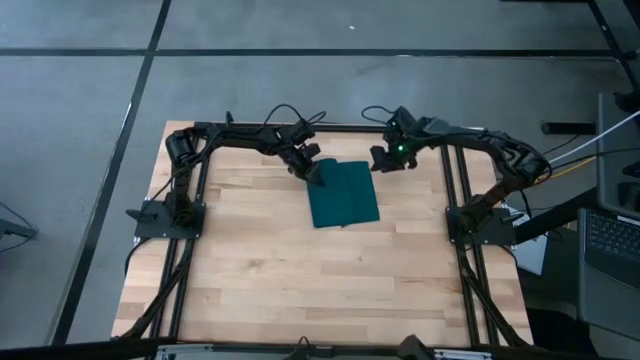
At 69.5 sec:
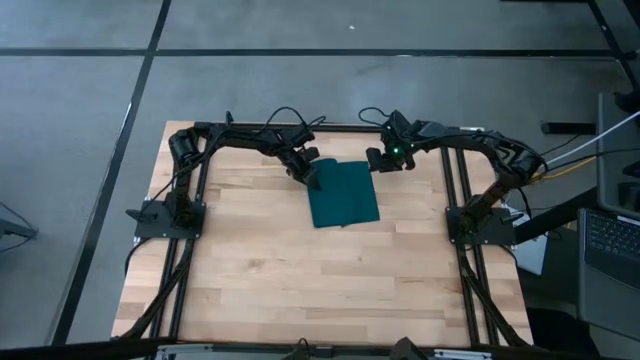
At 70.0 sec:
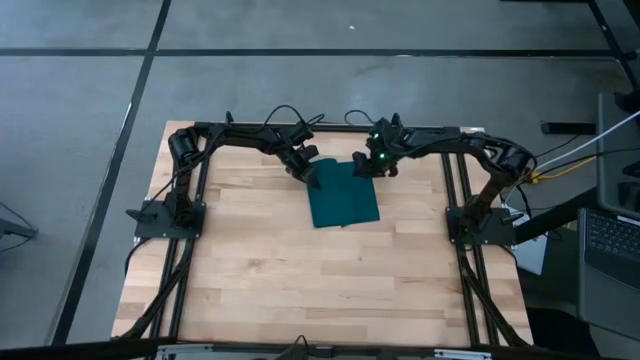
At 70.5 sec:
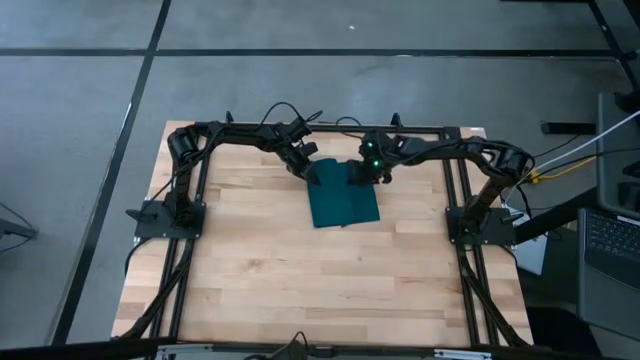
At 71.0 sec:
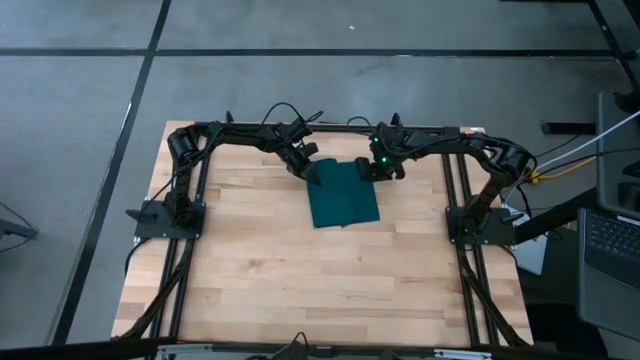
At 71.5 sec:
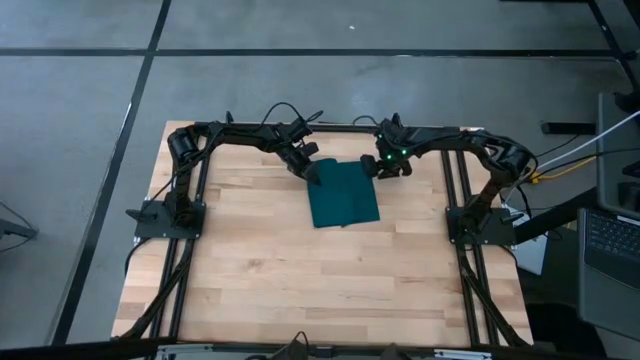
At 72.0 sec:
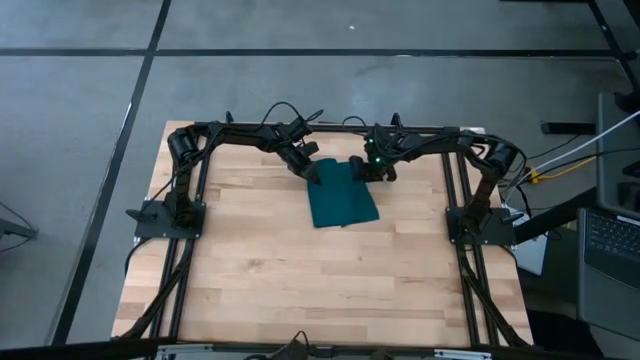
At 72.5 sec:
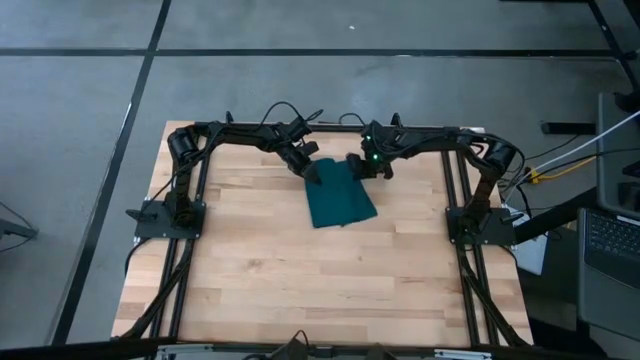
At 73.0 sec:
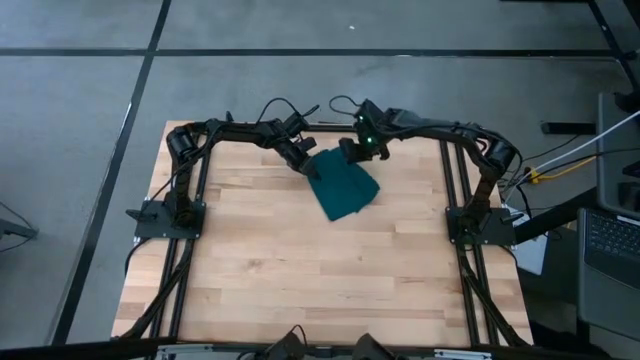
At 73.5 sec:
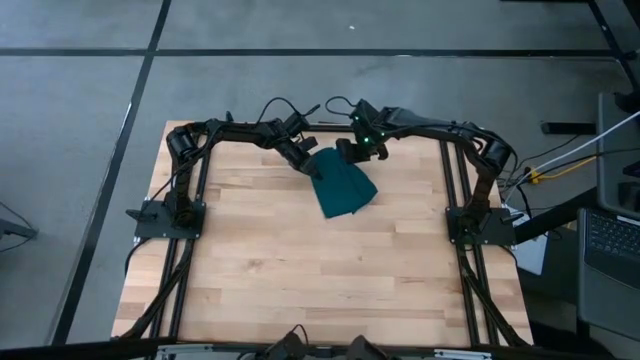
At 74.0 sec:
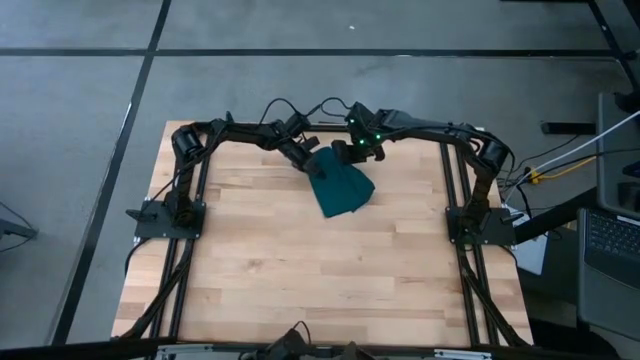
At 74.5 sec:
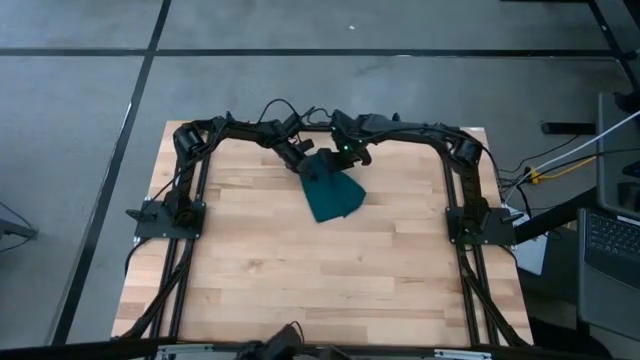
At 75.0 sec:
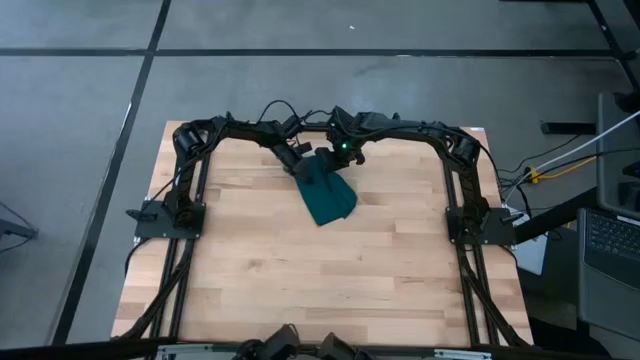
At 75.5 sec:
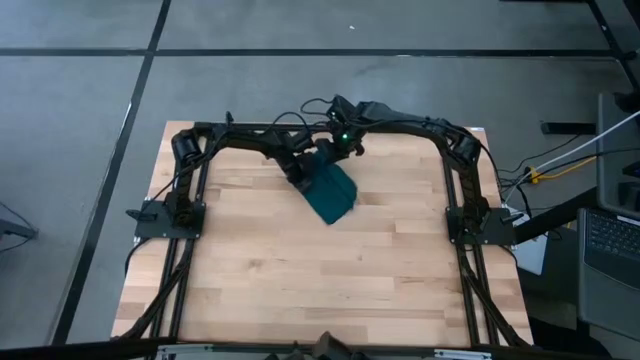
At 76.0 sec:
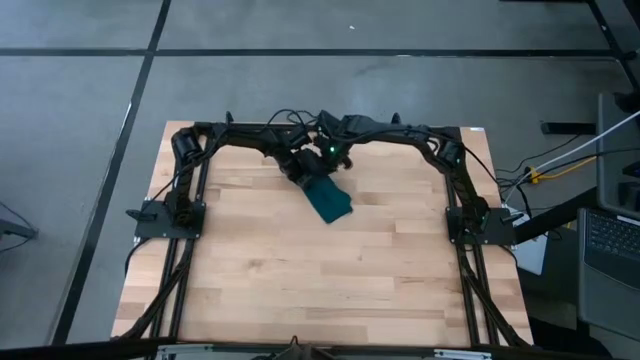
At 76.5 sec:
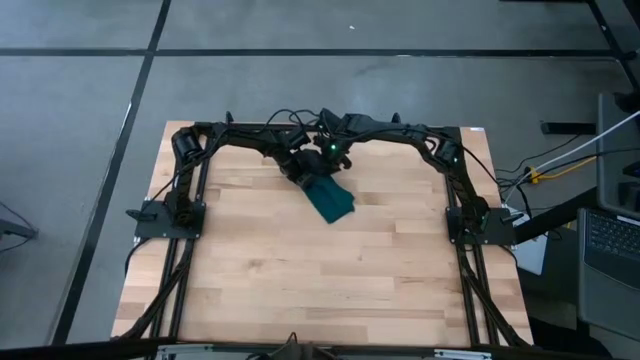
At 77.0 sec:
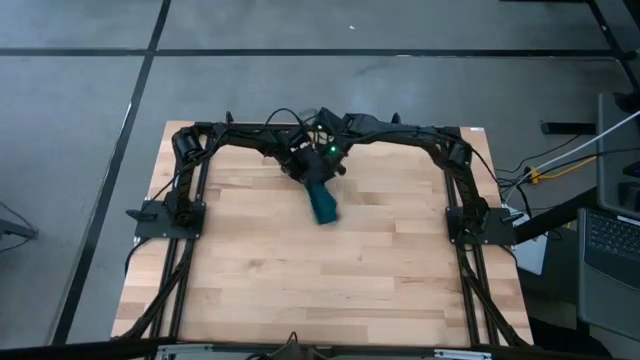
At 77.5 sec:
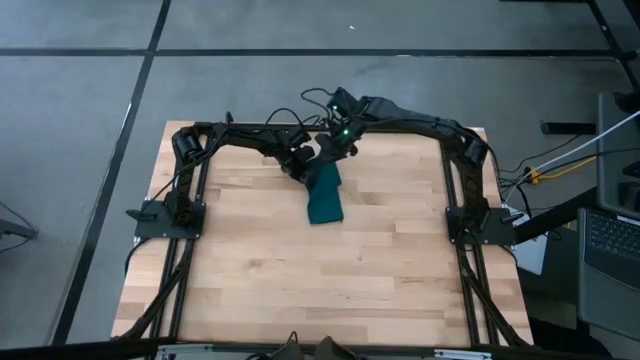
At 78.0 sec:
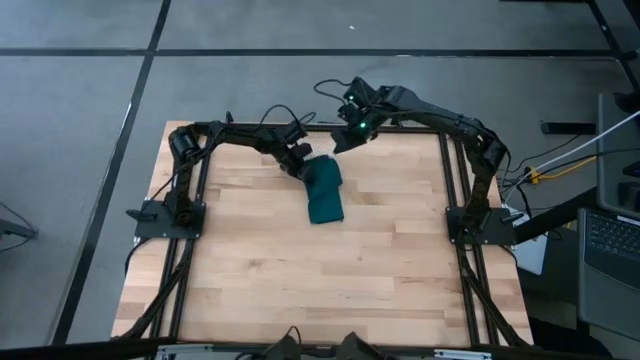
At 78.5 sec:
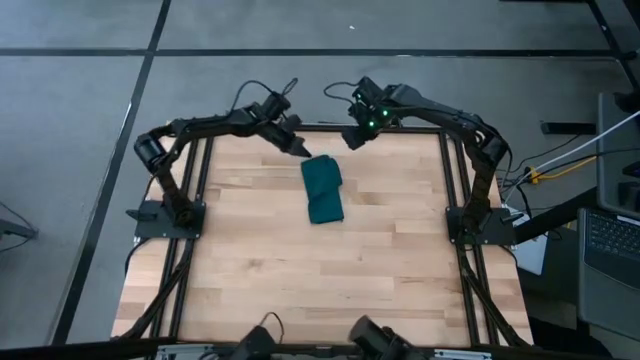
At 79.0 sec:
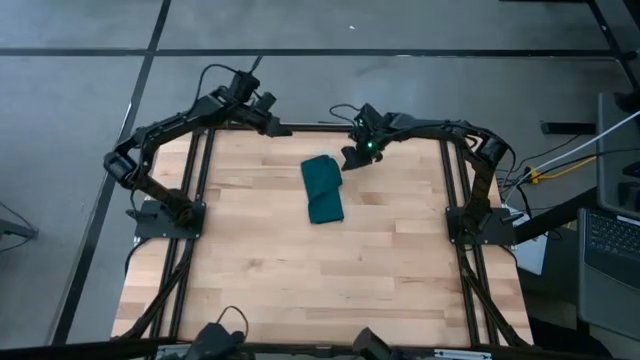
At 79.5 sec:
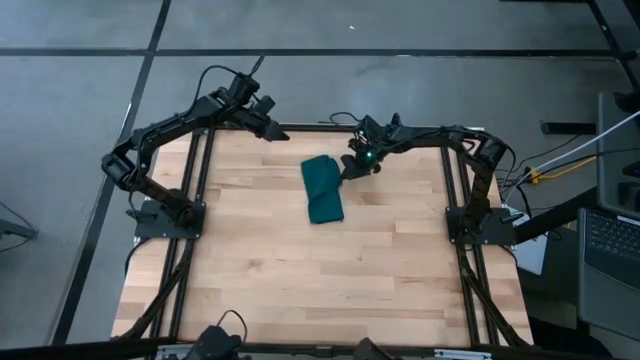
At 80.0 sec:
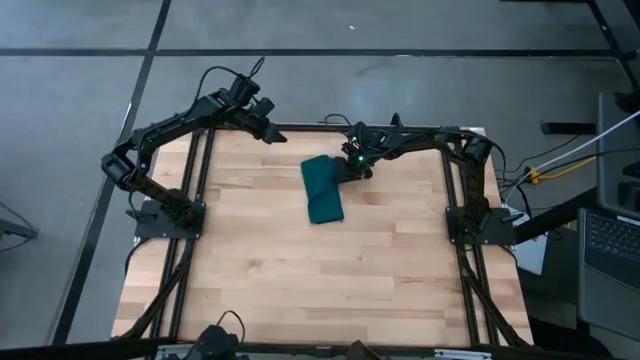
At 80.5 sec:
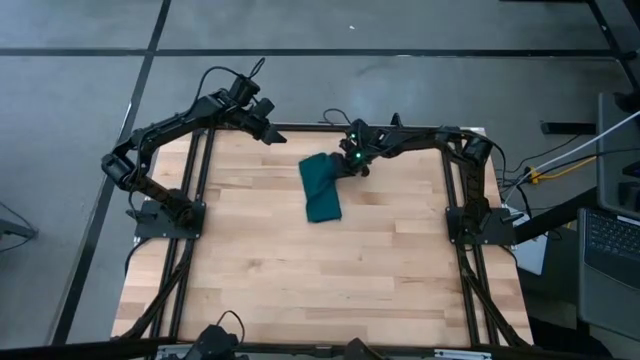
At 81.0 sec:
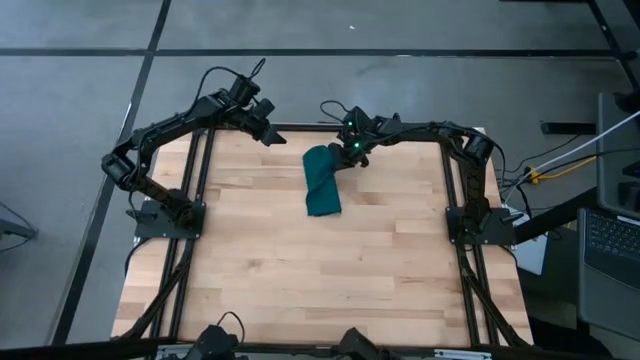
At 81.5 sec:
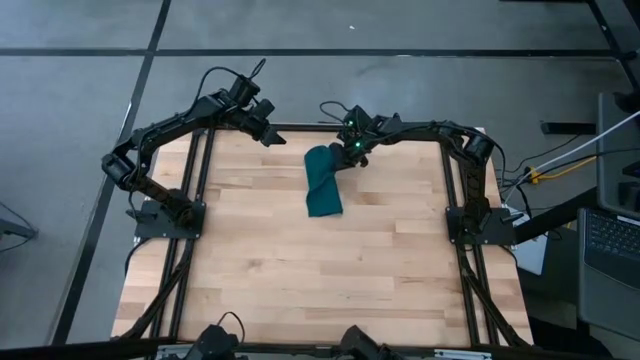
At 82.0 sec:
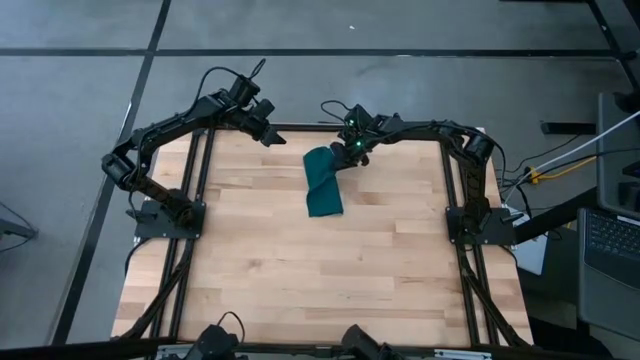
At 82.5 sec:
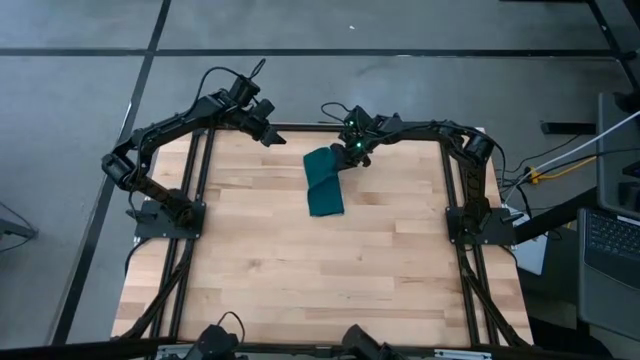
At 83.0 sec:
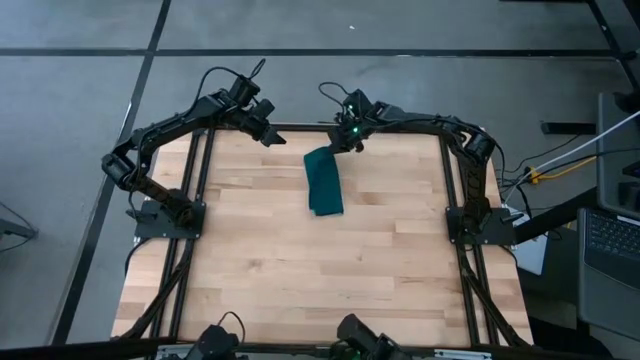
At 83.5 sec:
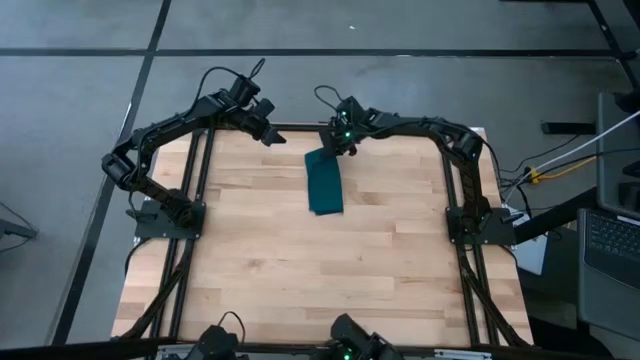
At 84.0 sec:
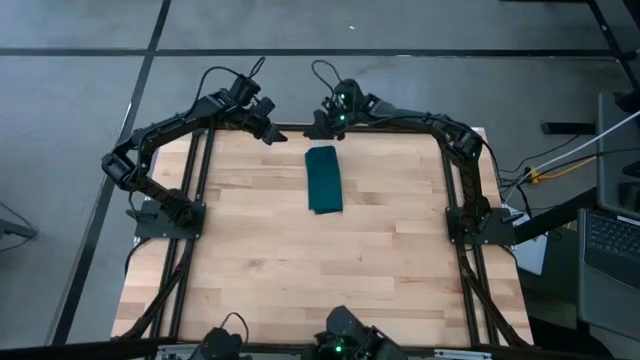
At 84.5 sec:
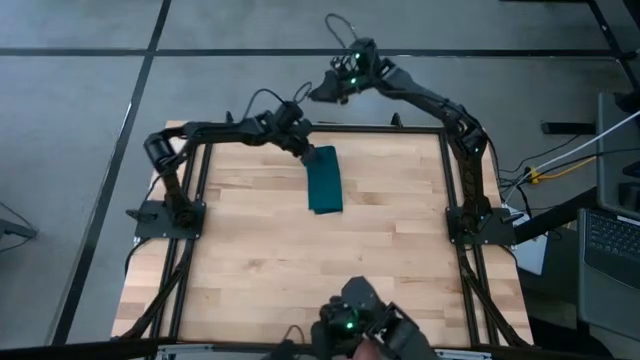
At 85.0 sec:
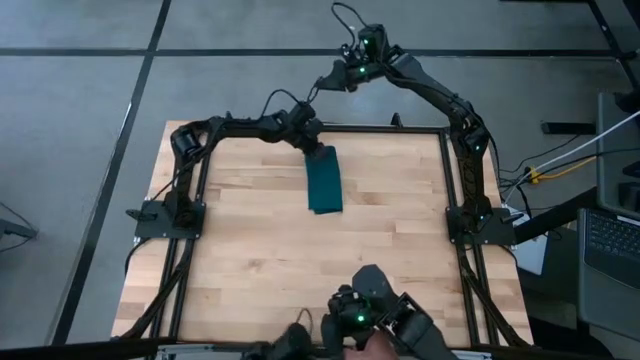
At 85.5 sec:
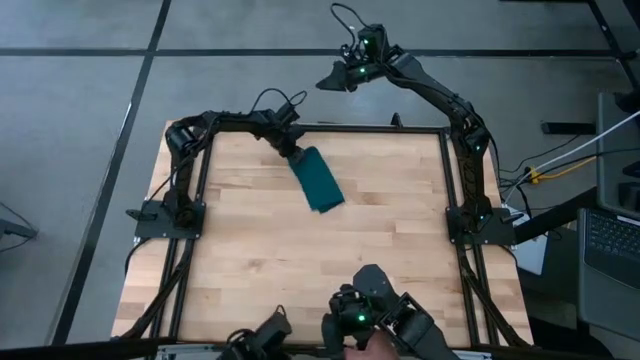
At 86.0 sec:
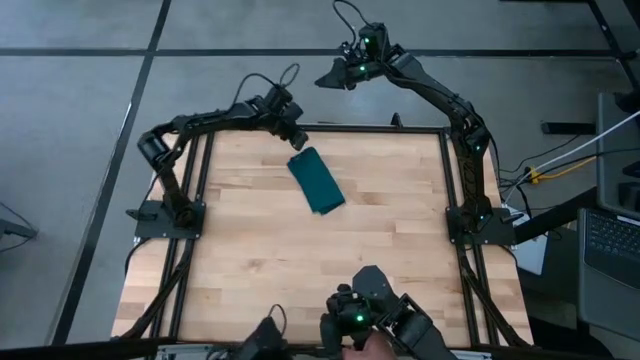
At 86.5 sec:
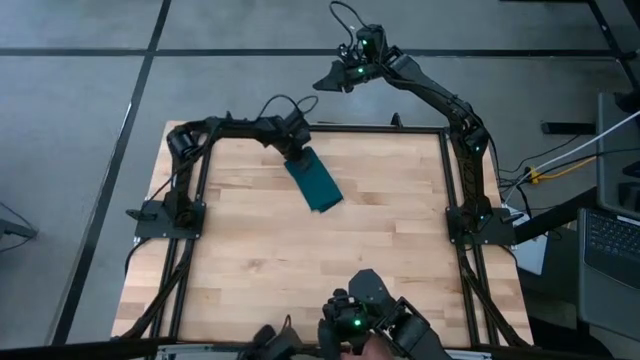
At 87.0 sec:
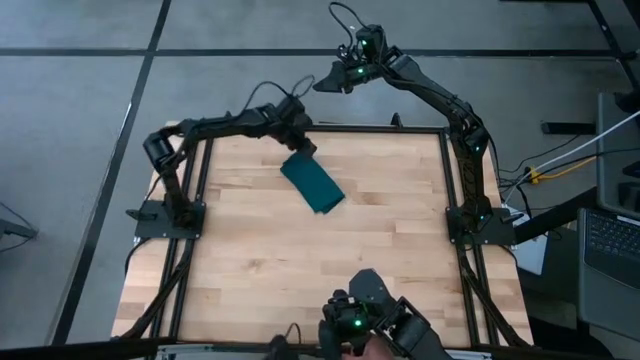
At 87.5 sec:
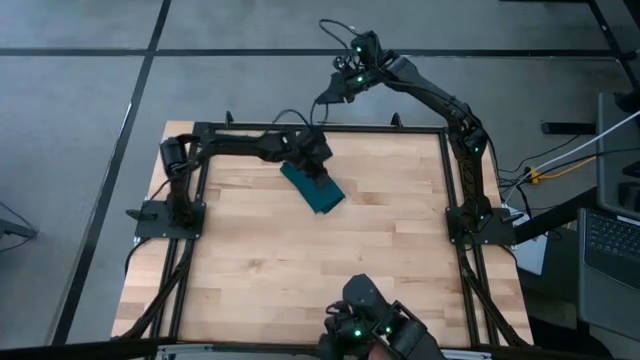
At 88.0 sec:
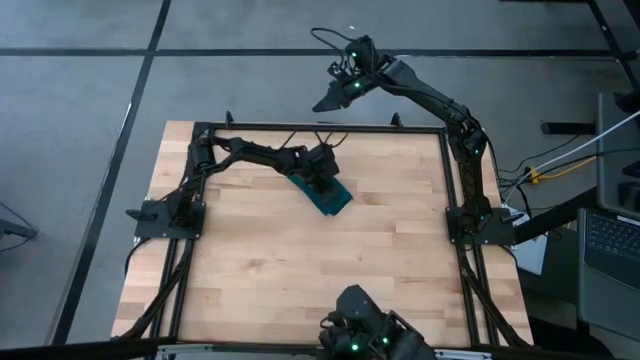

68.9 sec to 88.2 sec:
Task: Fold microfiber towels
Fold the dark green napkin

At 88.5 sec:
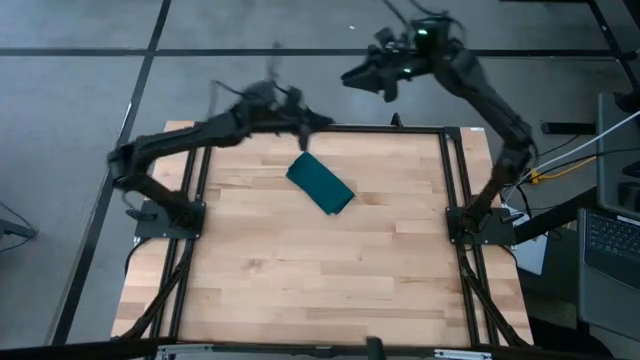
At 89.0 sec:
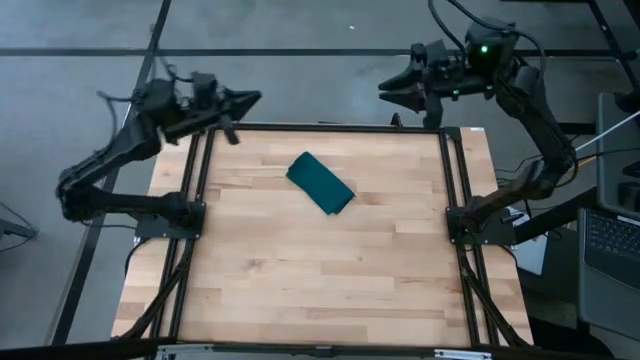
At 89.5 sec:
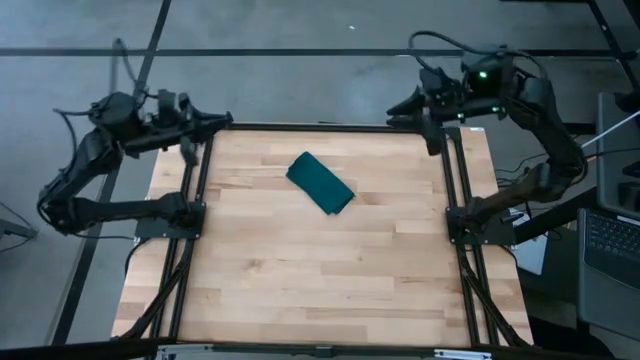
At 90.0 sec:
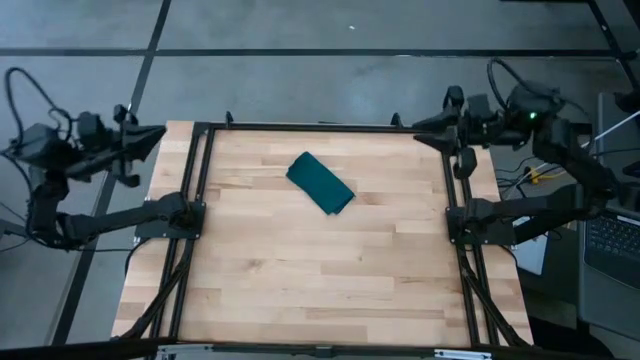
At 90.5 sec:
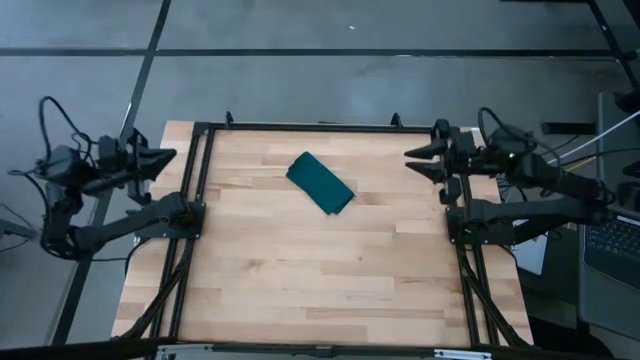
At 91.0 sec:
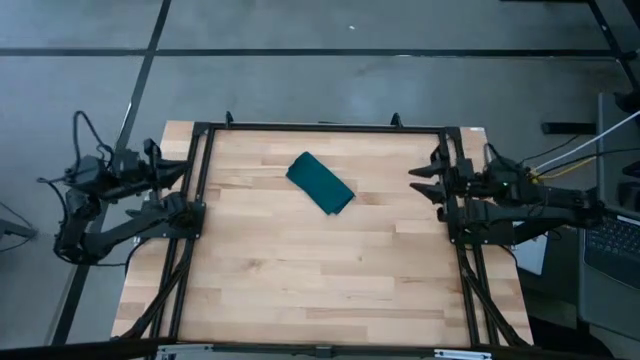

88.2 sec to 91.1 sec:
Return to Home Position
